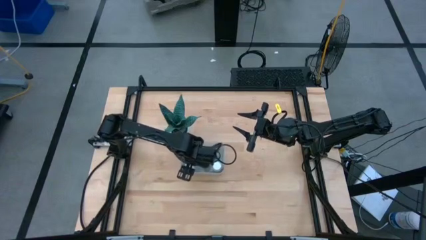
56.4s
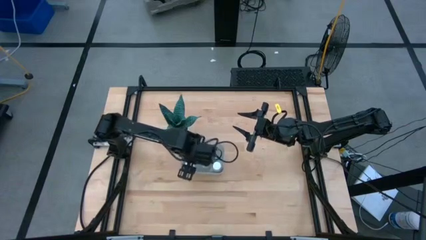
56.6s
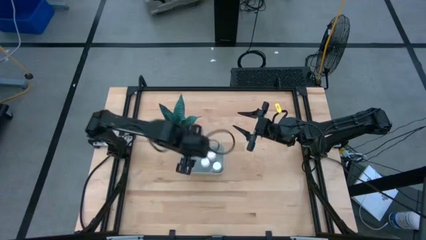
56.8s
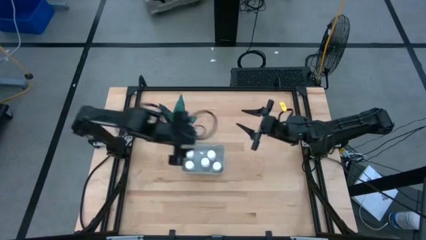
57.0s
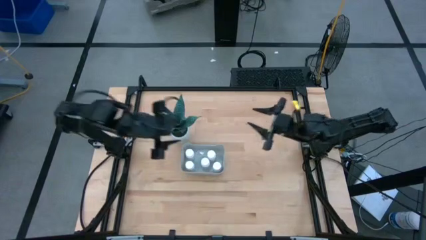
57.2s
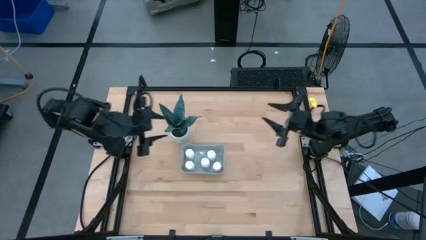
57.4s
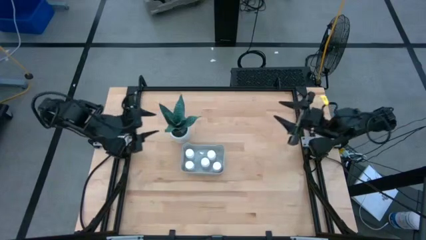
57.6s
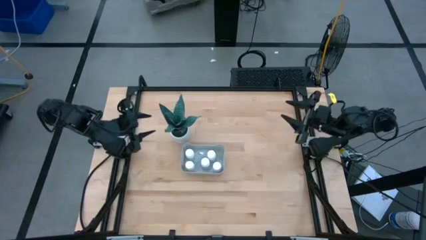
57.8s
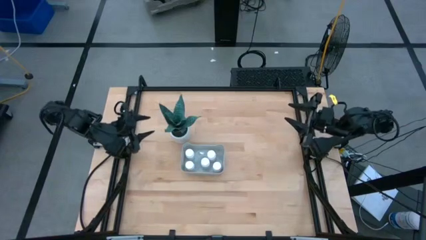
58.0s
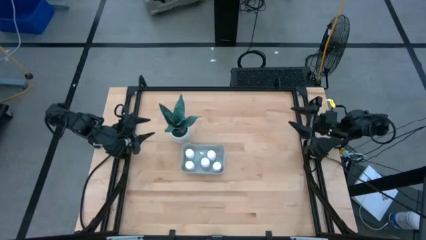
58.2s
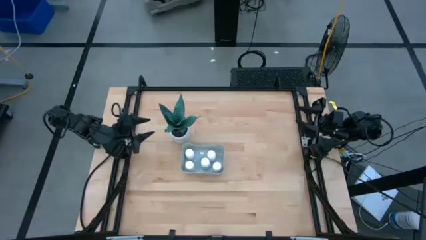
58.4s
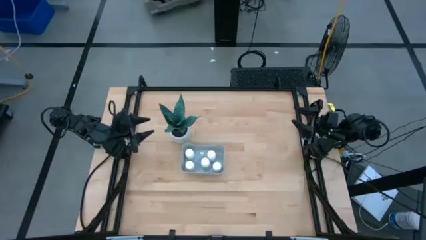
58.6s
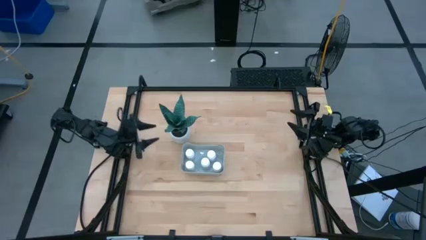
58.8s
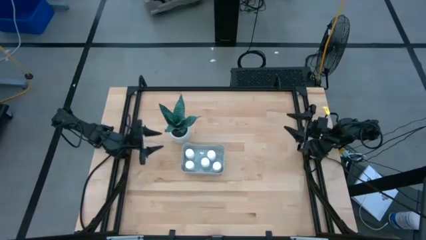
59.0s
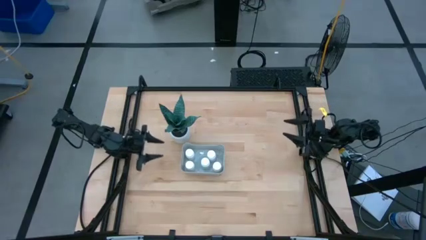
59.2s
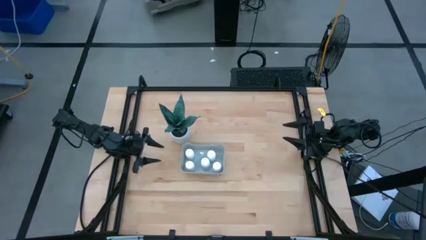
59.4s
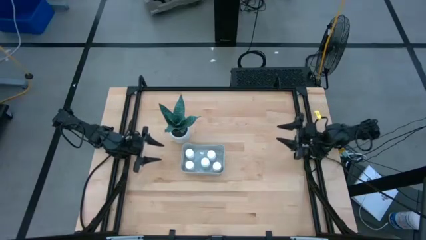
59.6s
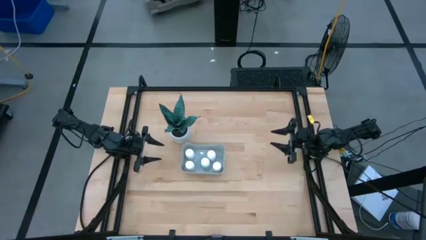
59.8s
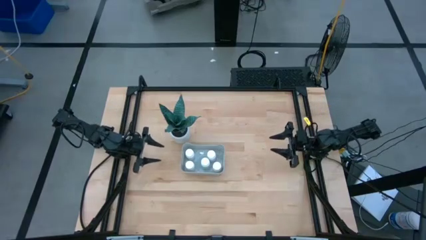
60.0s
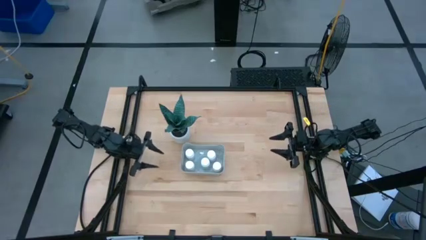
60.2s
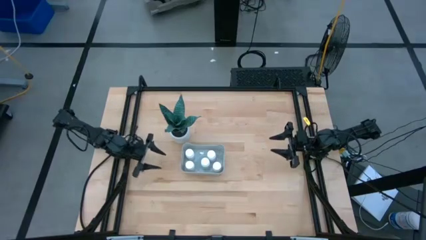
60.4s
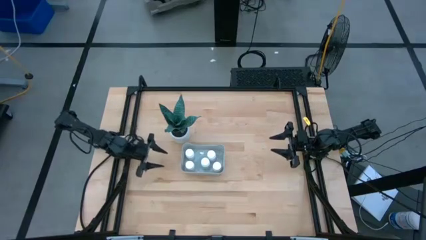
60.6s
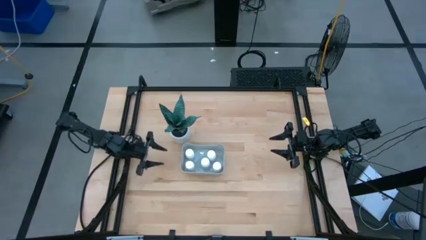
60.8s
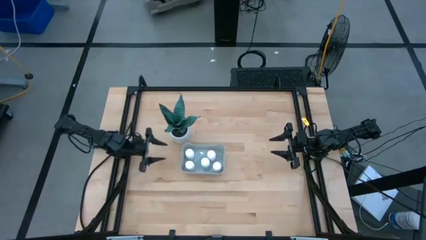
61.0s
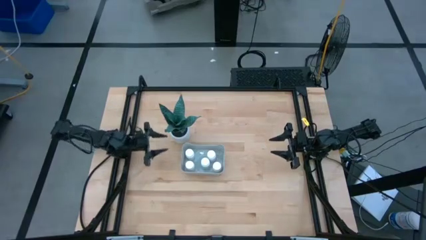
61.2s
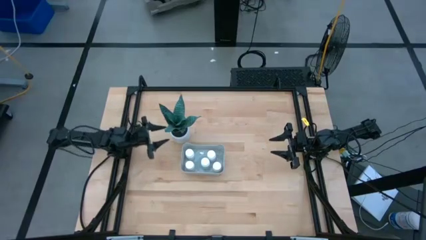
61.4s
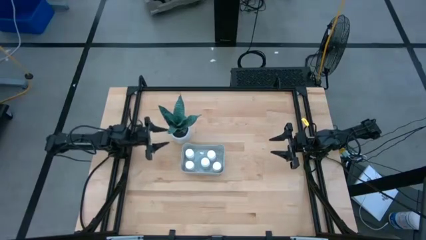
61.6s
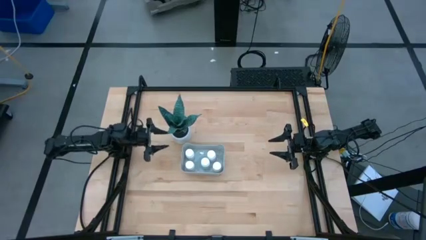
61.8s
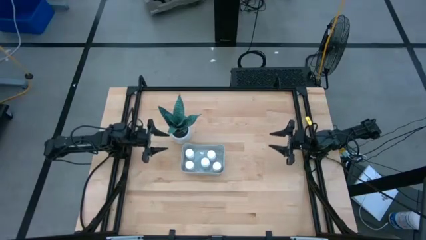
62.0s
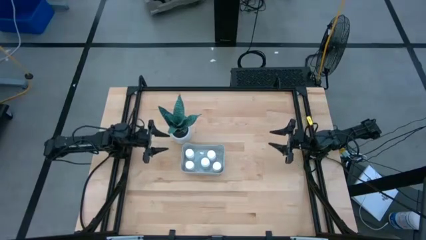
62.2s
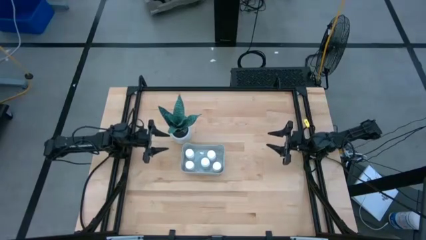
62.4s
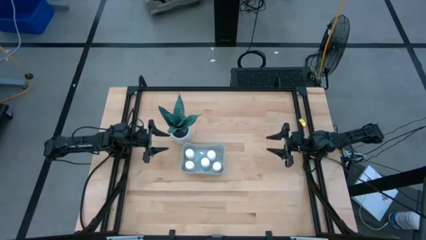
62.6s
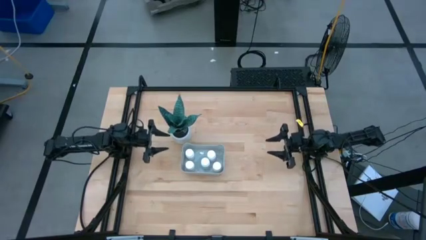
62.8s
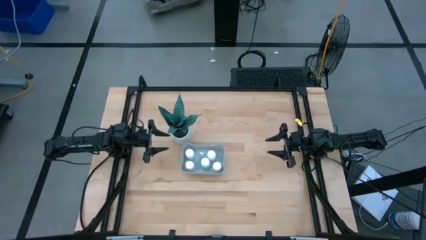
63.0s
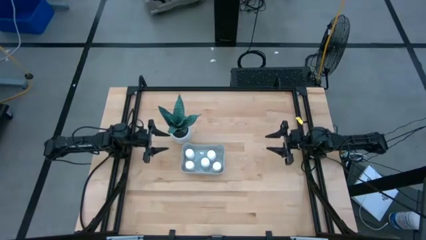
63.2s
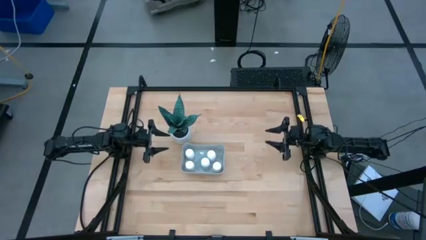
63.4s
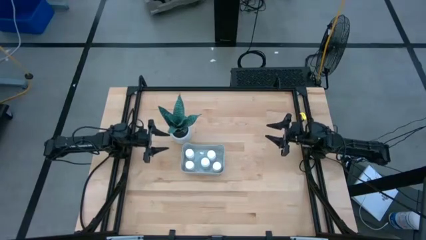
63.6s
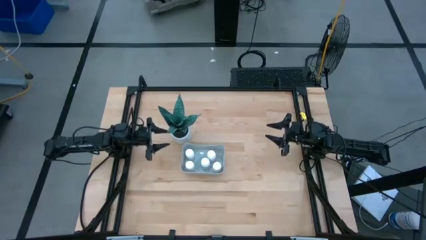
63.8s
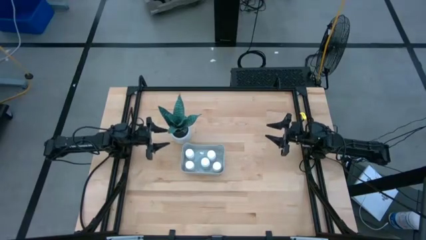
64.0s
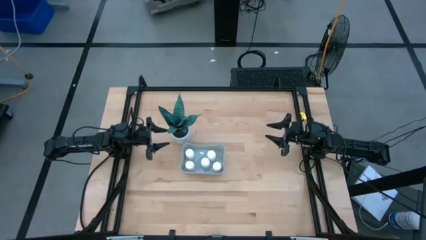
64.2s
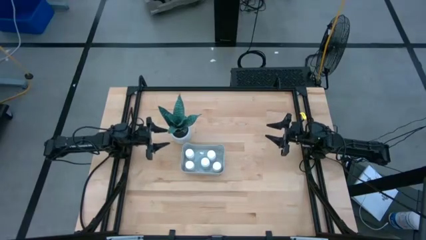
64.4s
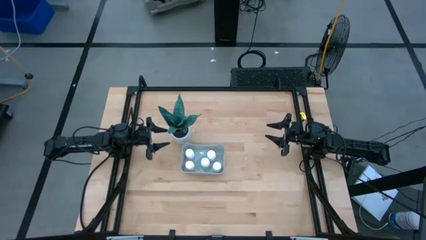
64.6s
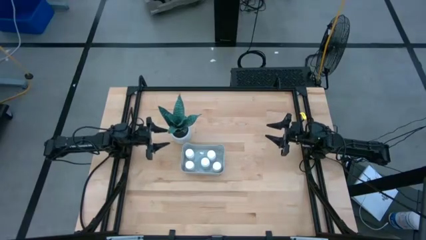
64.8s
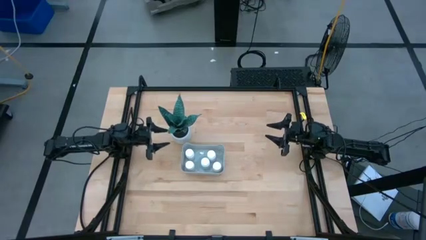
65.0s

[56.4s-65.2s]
Task: Pick and place pill bottles into a basket
Return to Home Position

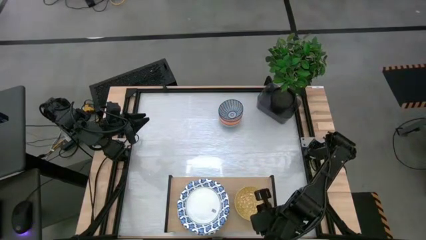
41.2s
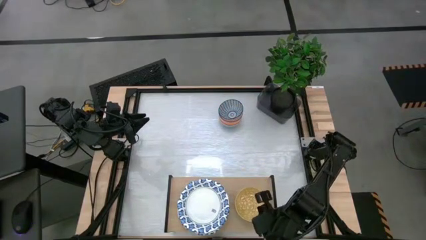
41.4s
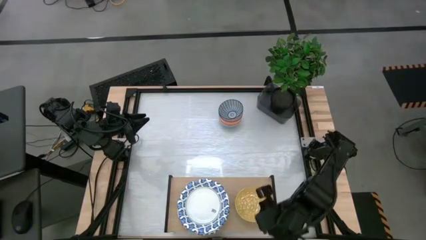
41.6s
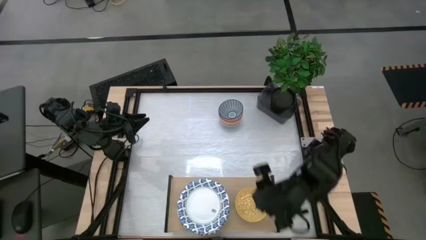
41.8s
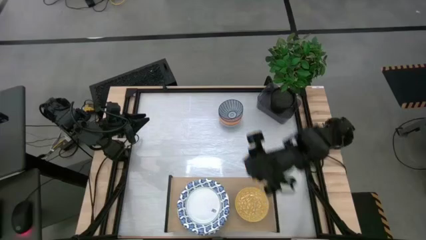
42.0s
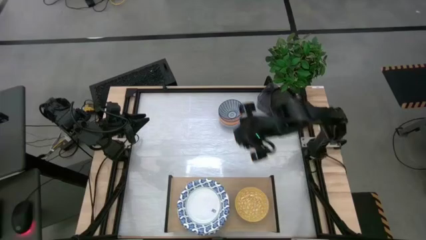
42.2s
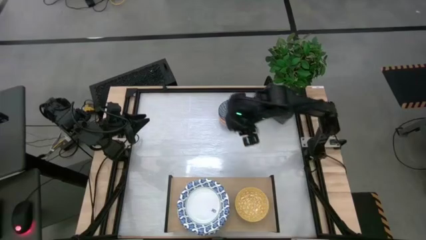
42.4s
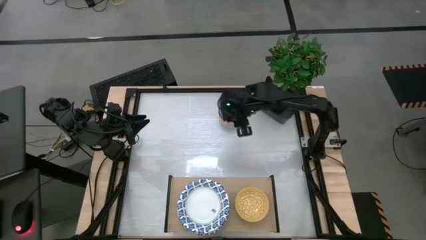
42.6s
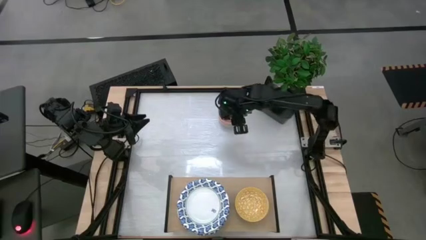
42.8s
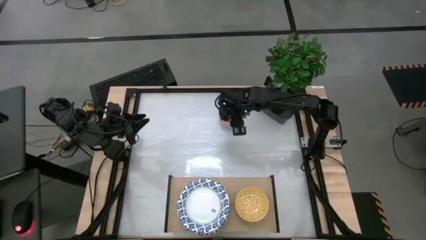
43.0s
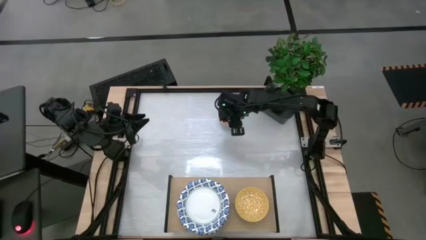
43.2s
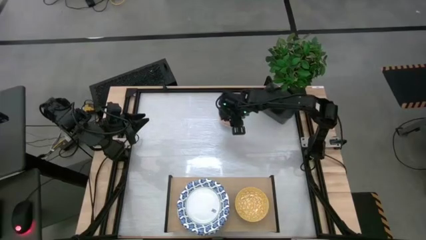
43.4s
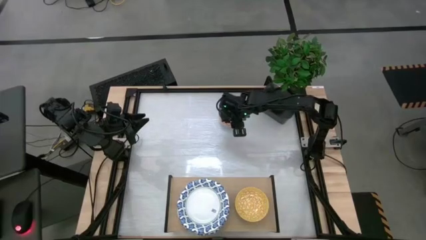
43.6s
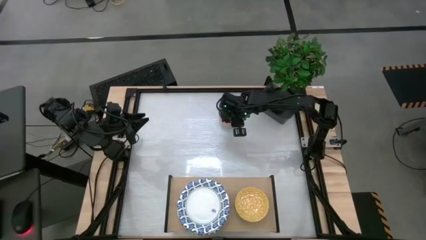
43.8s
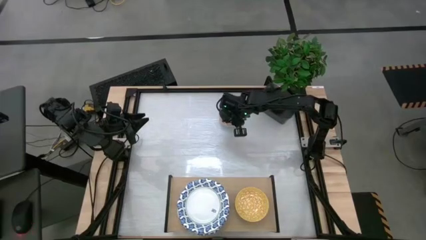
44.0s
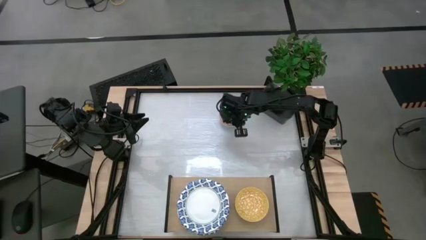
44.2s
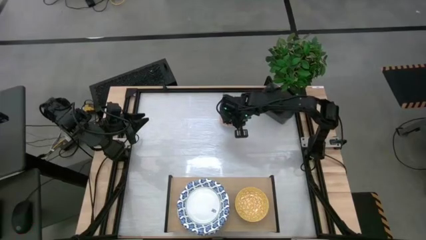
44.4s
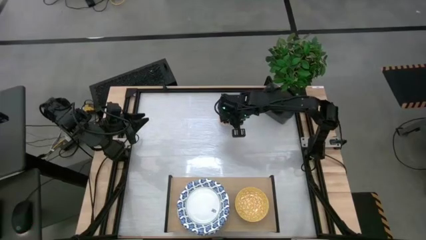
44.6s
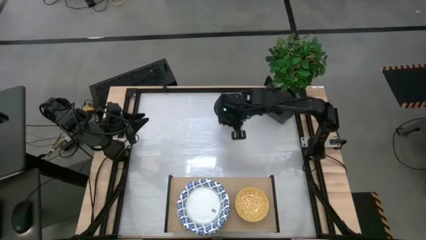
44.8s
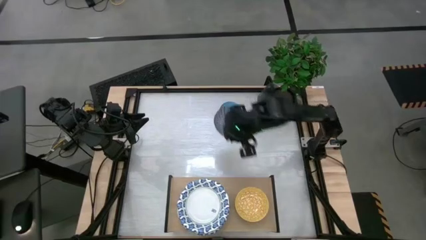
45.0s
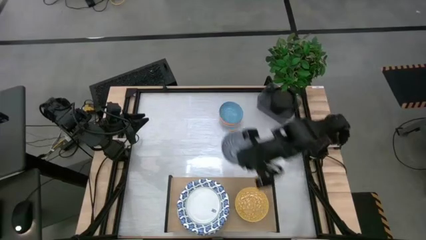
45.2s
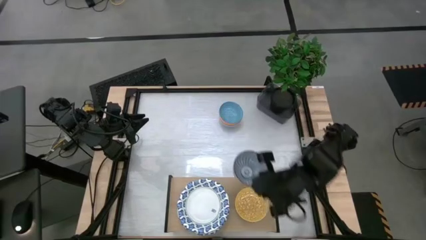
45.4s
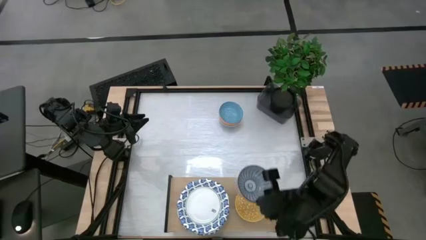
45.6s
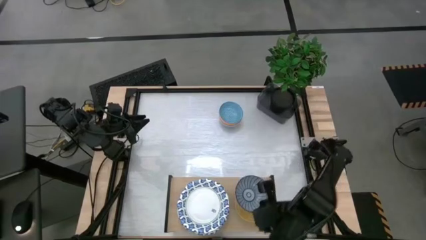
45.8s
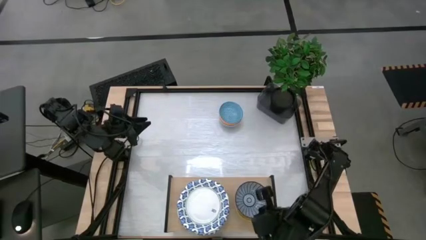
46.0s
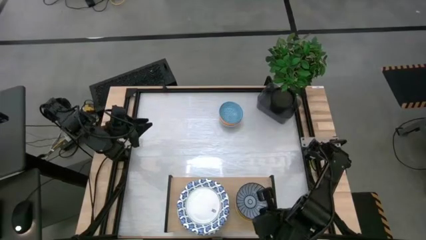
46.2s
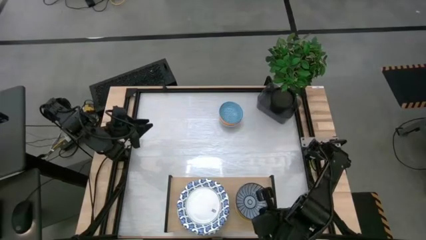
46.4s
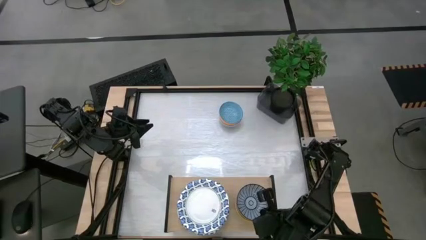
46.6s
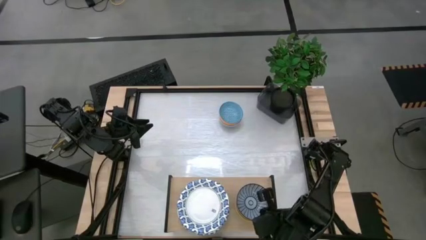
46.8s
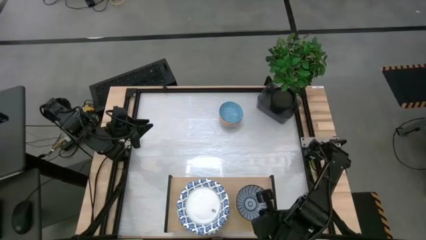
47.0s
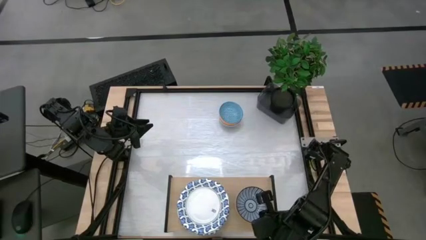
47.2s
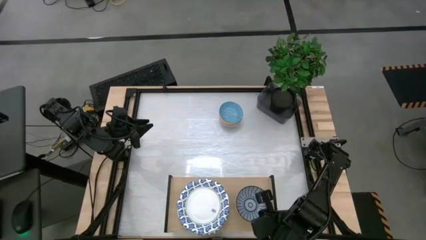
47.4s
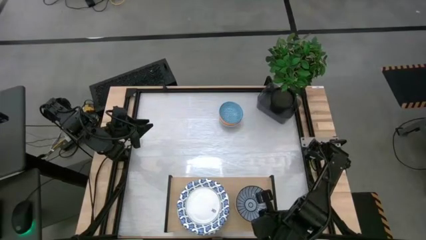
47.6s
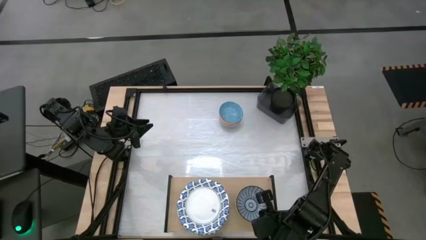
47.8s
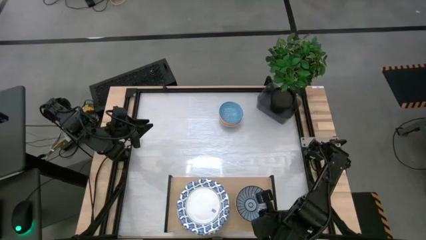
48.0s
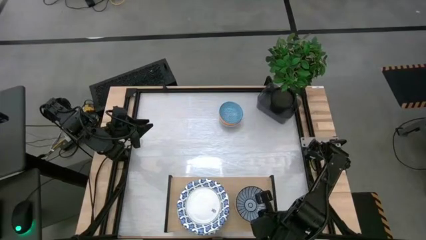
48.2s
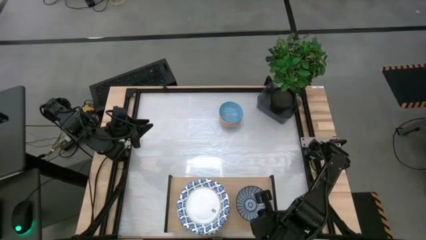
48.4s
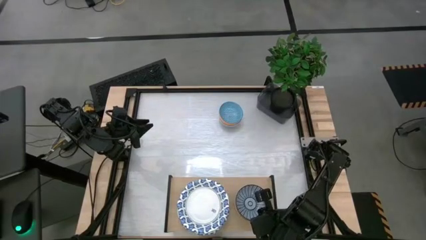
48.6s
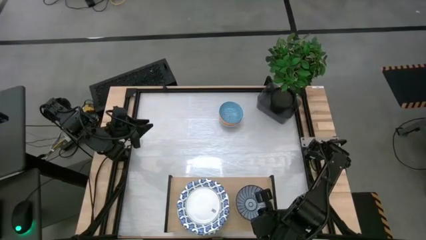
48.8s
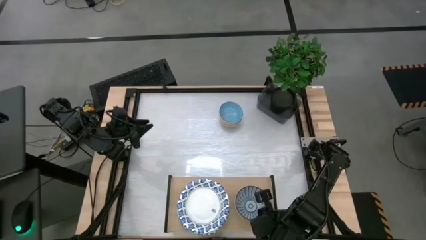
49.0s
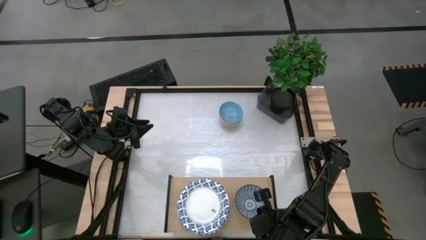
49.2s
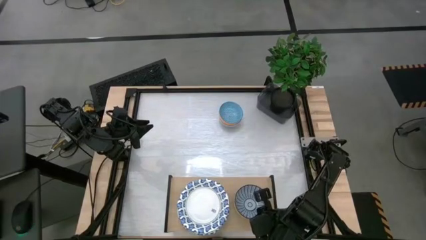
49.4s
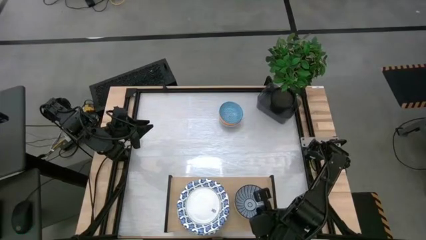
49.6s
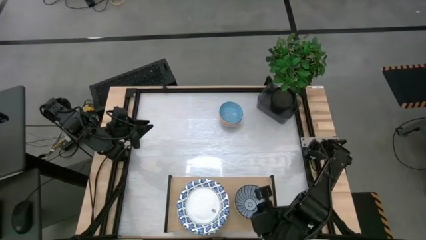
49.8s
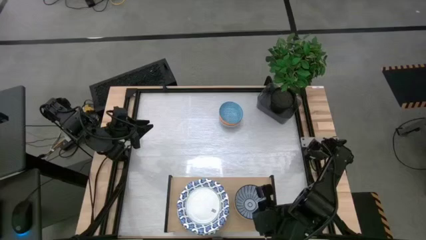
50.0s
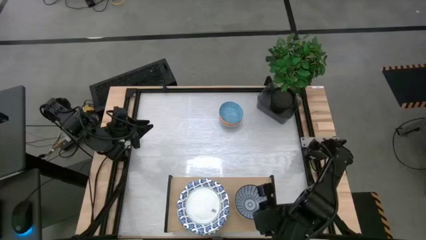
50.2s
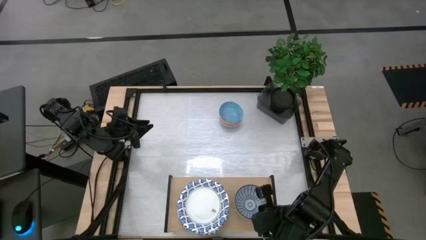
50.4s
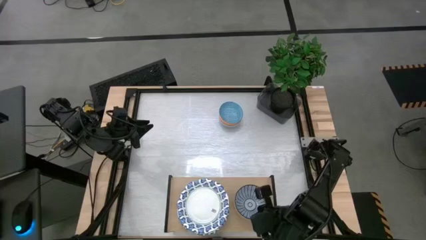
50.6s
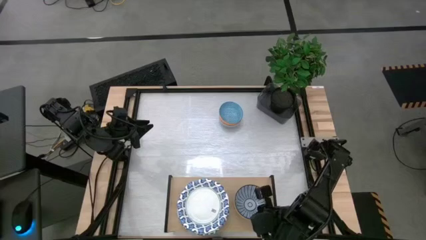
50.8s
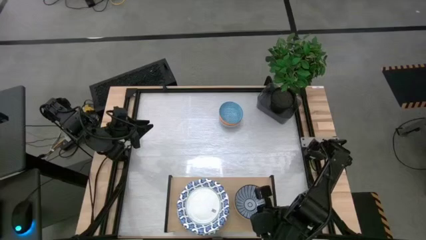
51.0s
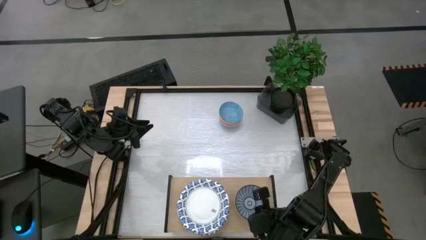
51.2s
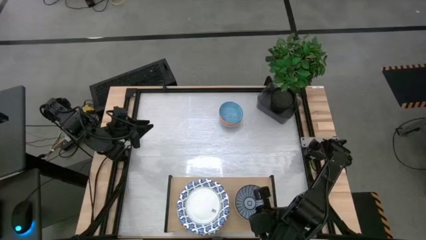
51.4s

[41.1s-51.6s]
Task: Place and stack plates onto a shelf
Stack the blue bowl on top of the yellow bowl on the shelf
